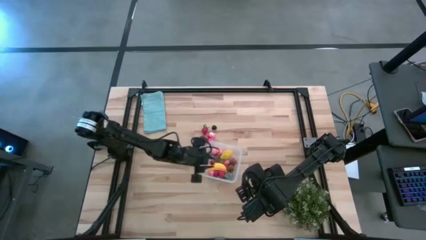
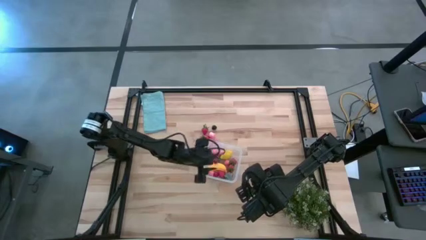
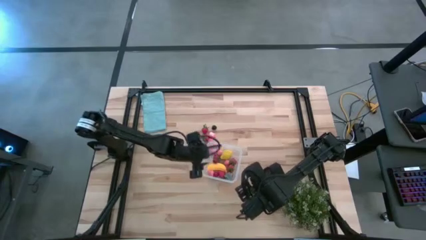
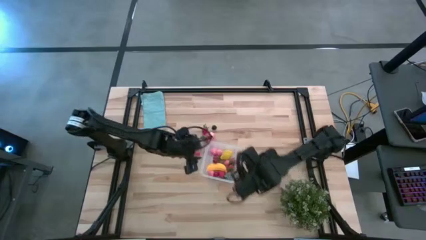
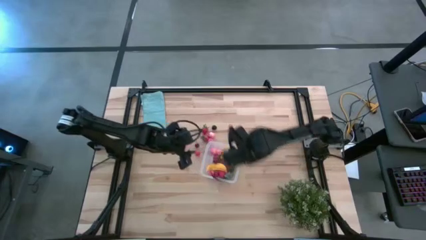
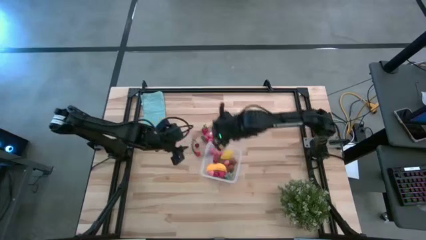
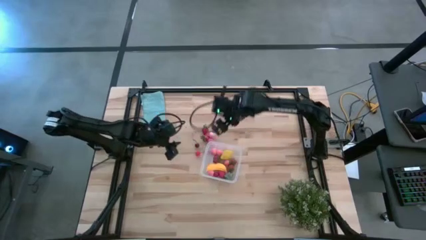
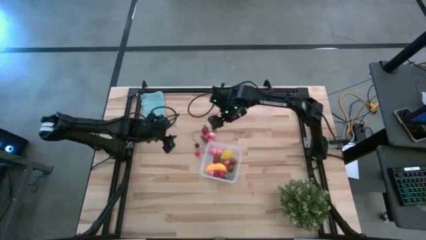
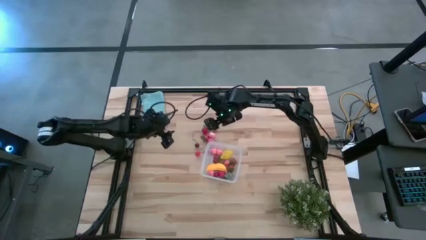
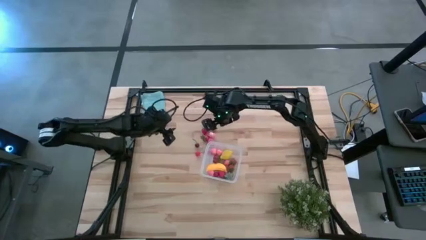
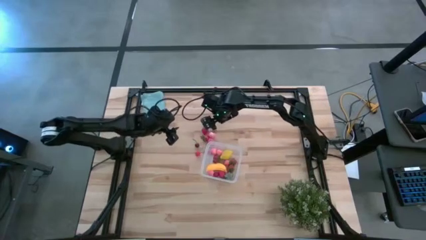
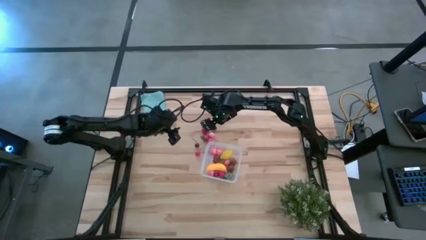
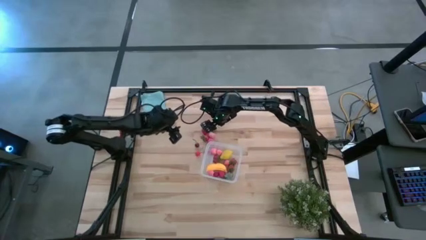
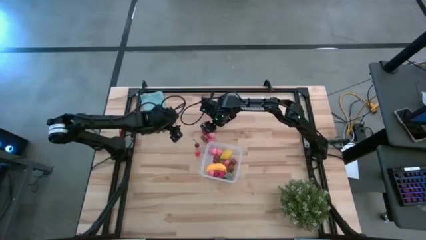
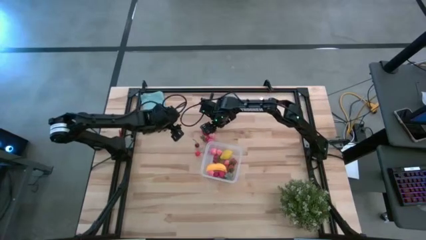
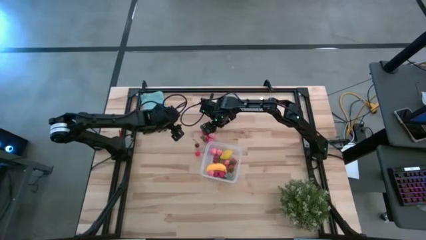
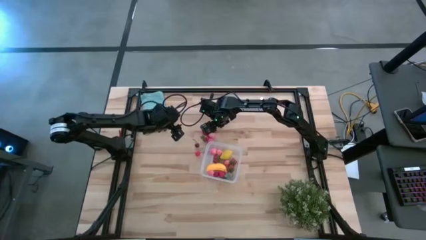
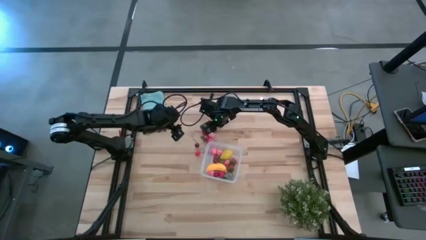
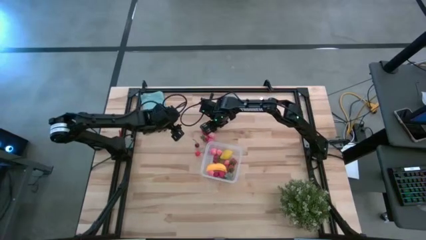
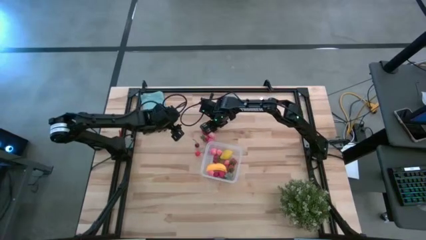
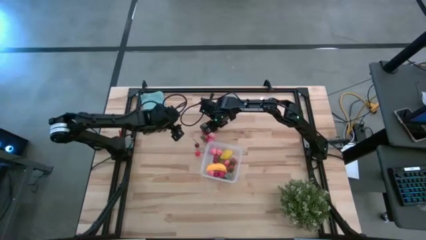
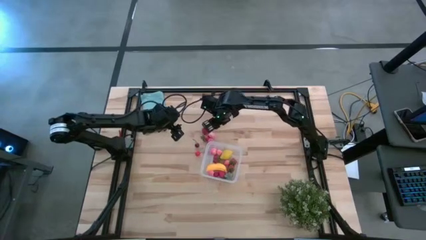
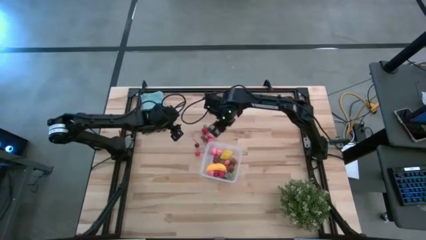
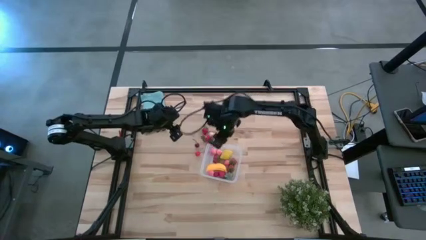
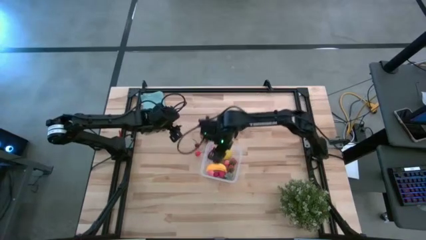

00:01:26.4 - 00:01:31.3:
Task: Pick and placing Produce into tupperware
Put the blackberry into the transparent container

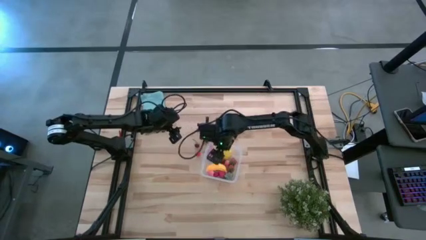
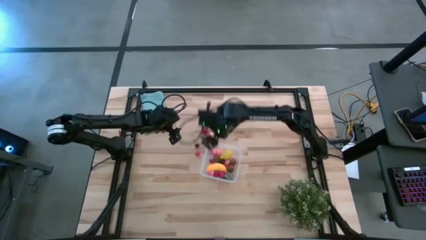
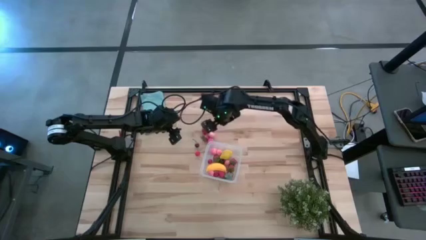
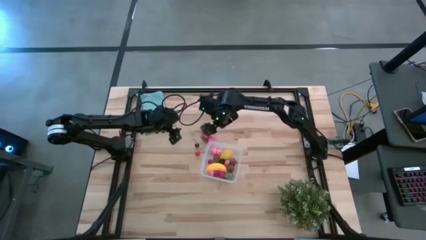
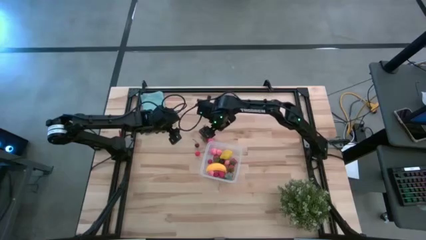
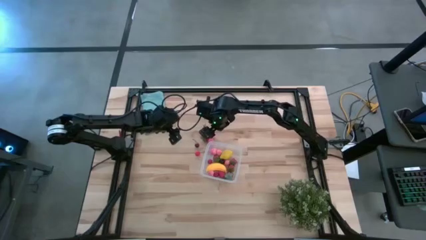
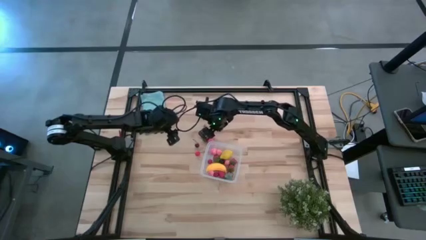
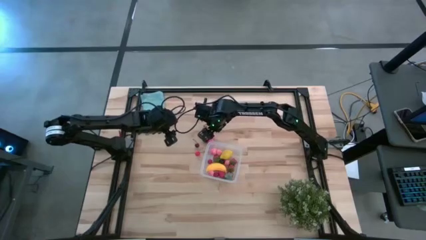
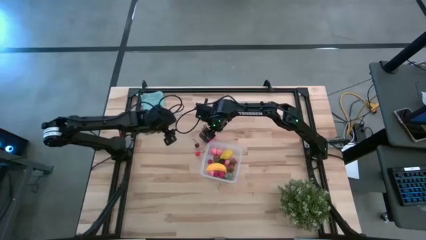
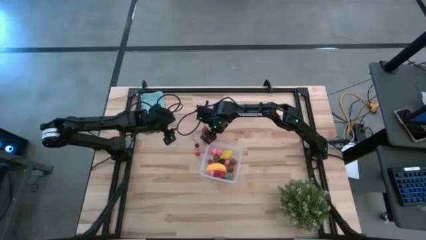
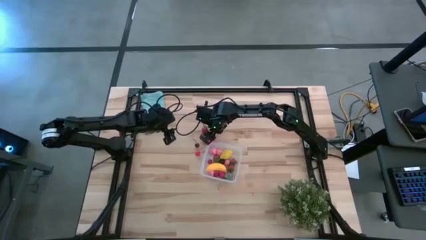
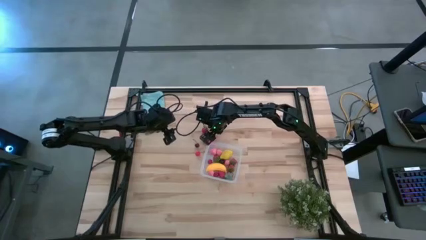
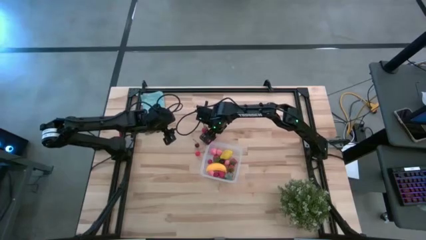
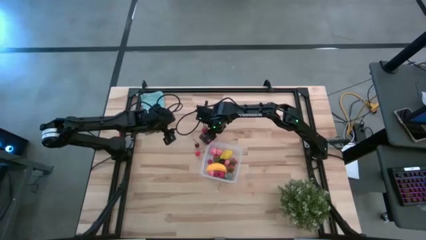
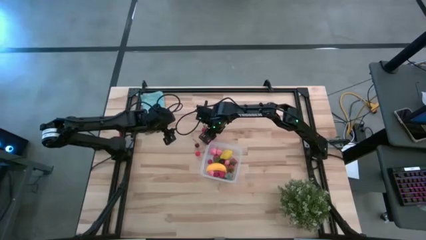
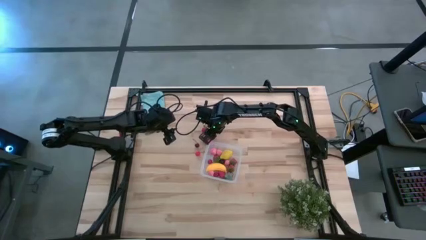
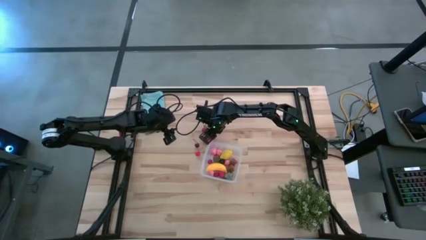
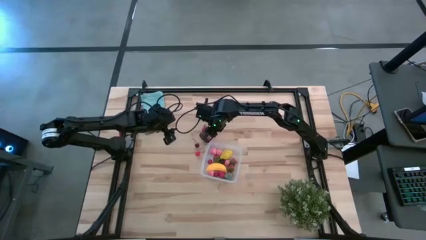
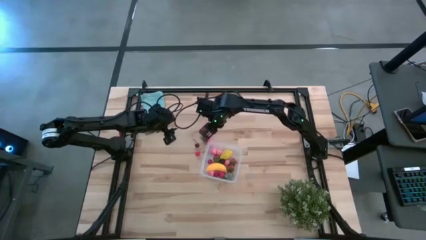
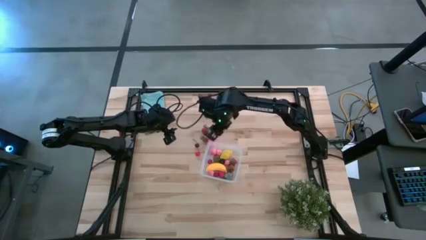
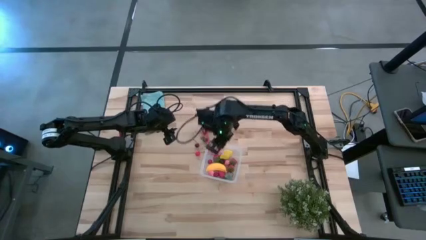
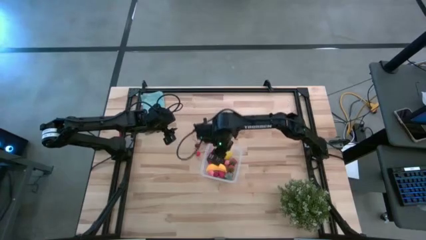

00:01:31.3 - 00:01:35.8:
Put the pink peach into the transparent container

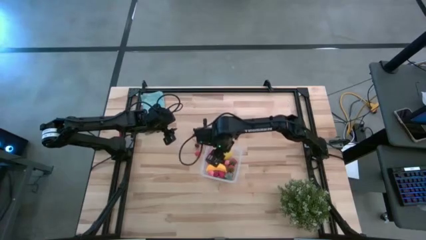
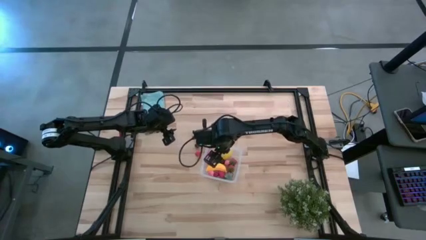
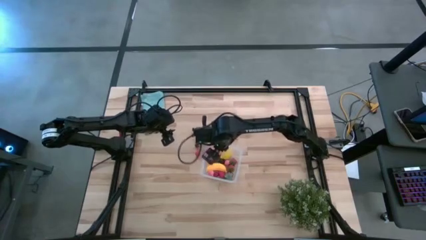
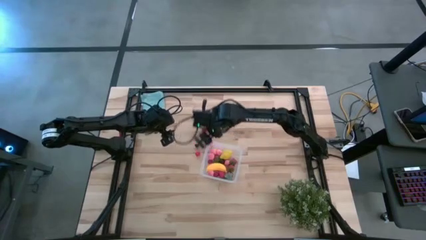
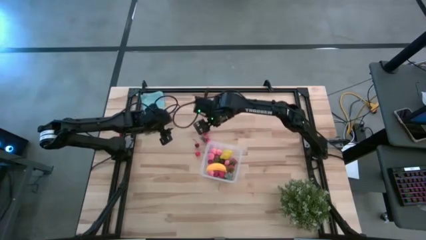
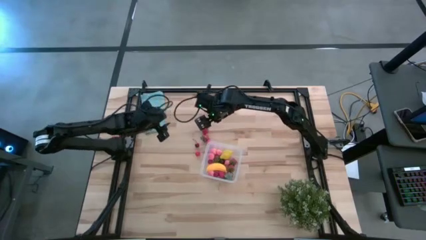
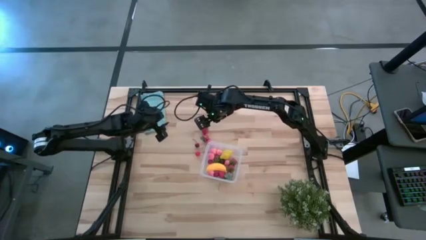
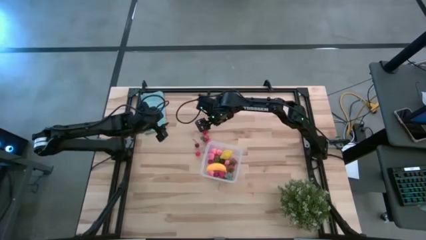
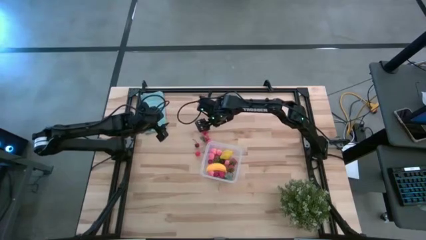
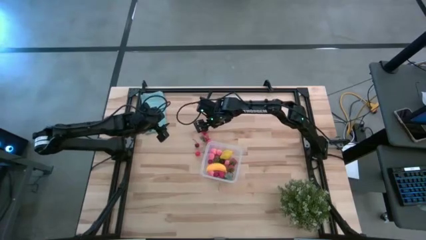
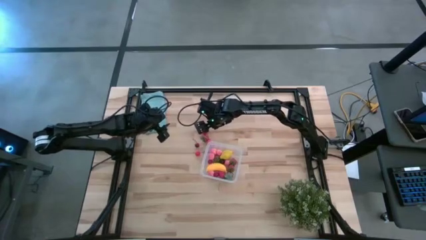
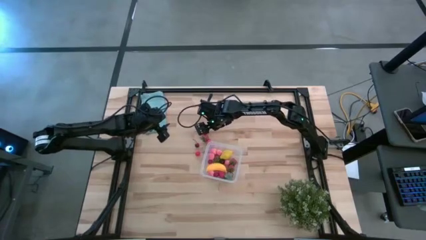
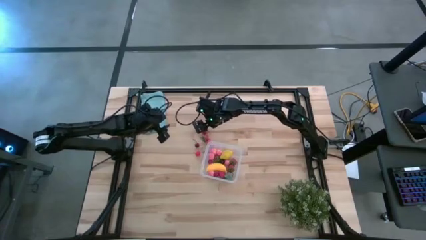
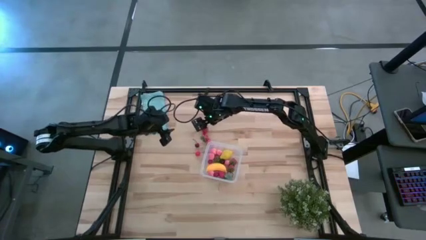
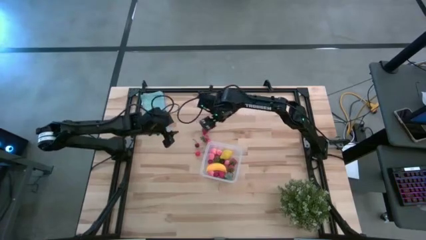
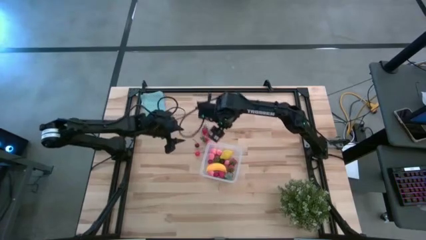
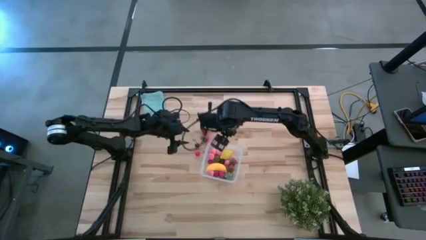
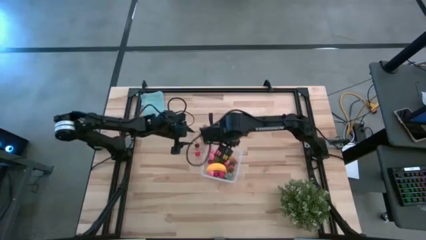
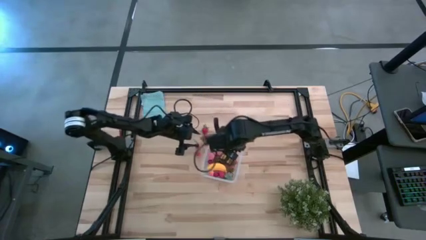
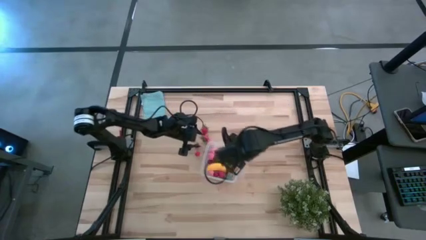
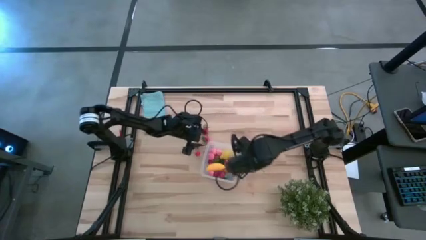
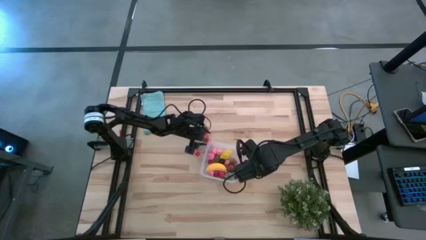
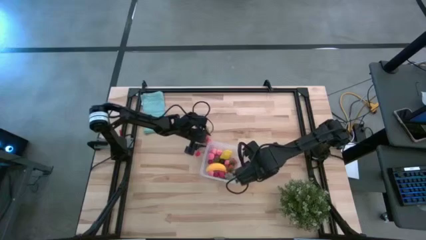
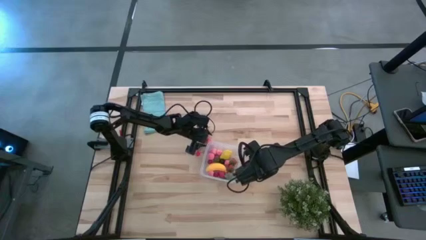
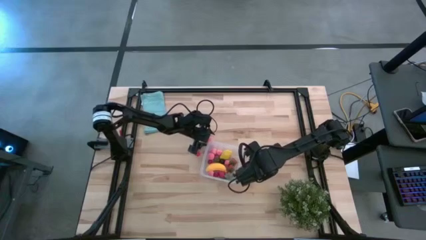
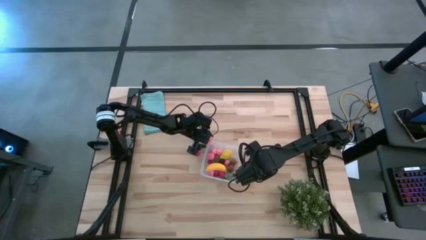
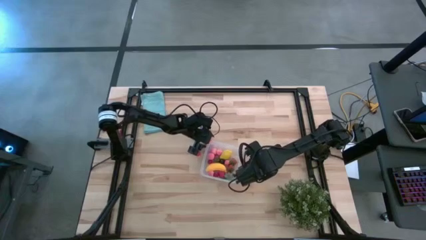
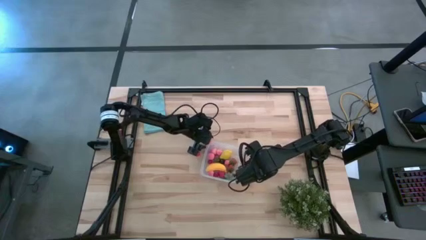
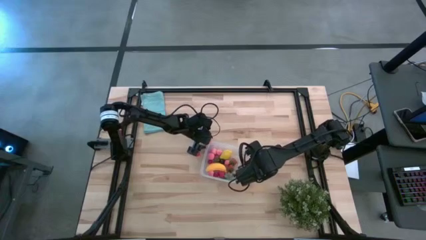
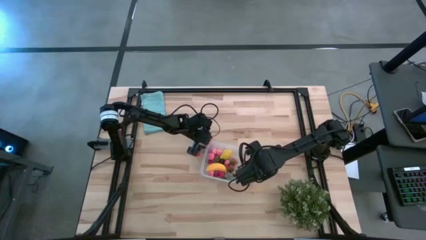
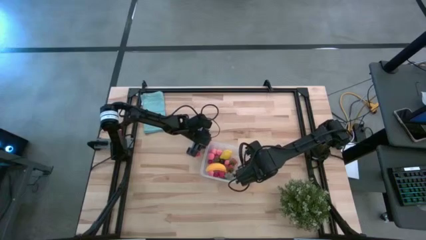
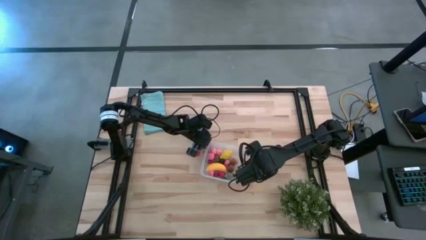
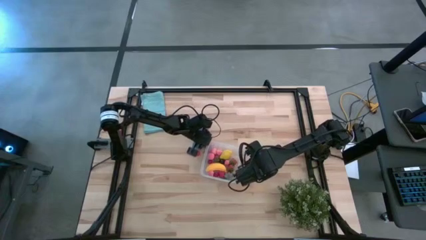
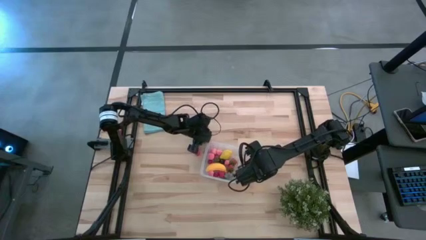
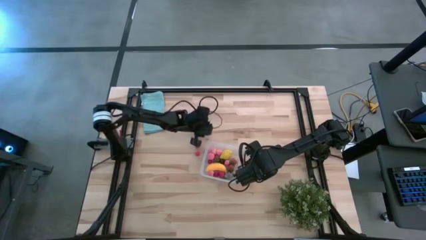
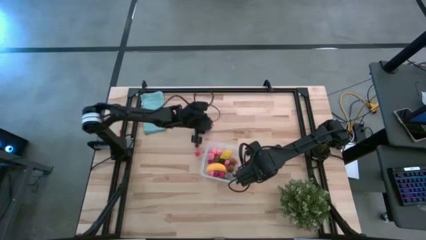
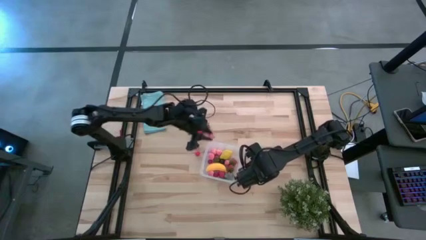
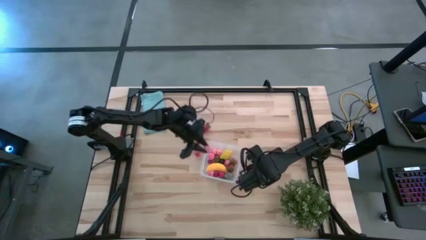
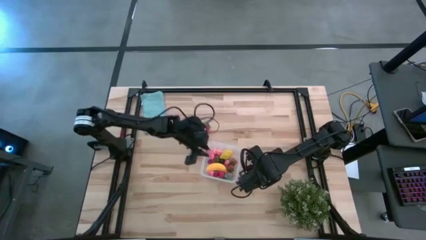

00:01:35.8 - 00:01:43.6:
Put the pink peach into the transparent container
